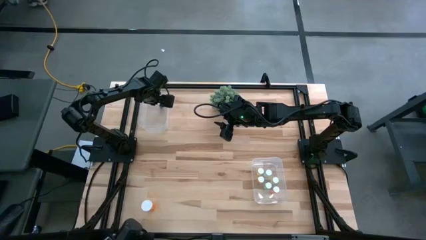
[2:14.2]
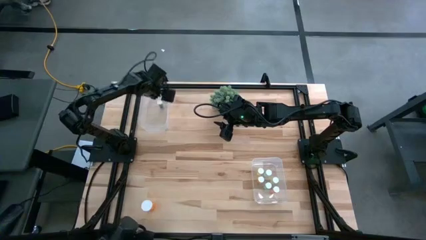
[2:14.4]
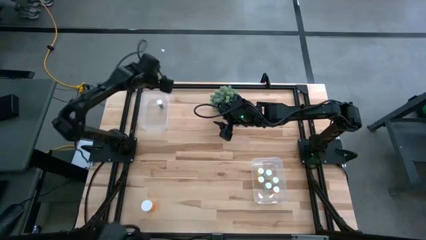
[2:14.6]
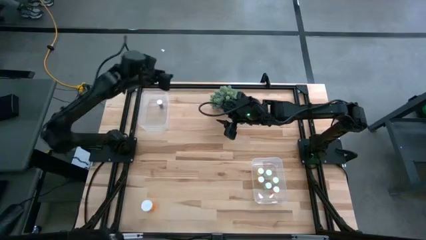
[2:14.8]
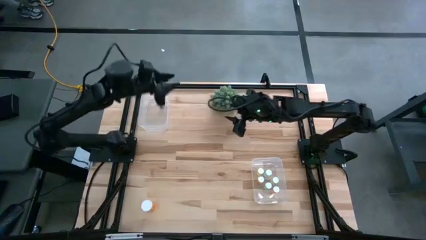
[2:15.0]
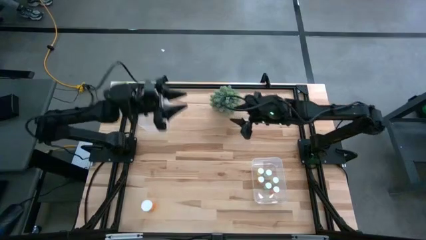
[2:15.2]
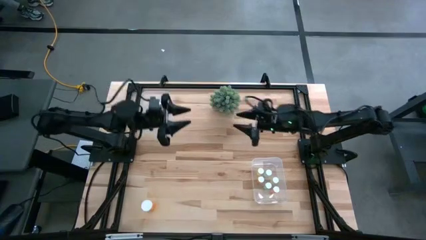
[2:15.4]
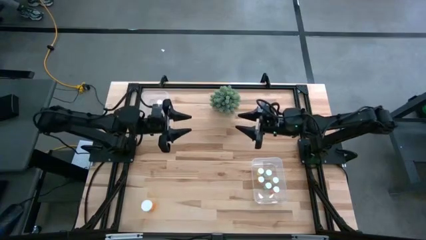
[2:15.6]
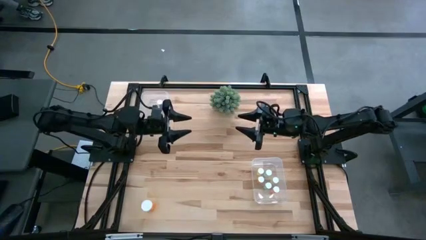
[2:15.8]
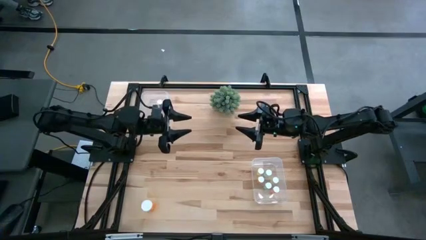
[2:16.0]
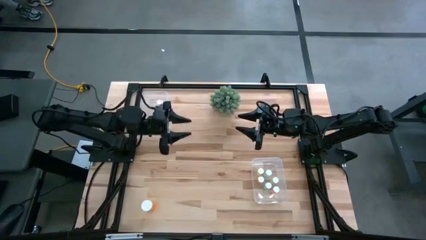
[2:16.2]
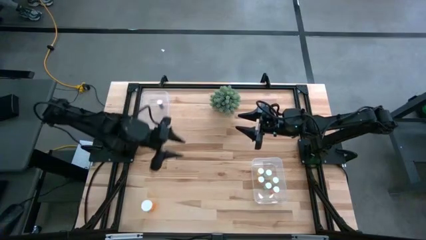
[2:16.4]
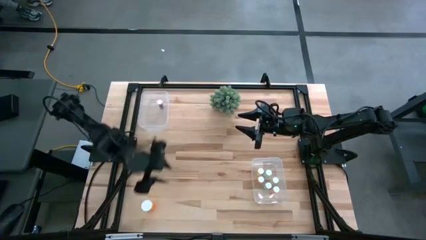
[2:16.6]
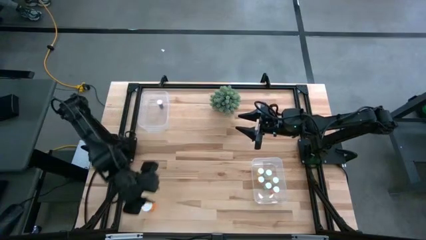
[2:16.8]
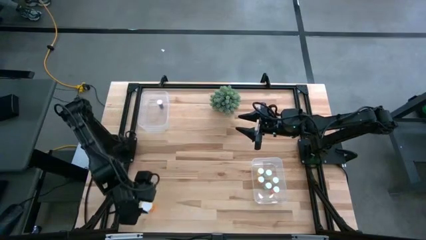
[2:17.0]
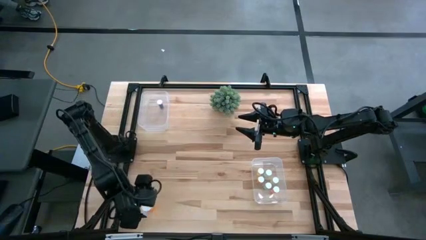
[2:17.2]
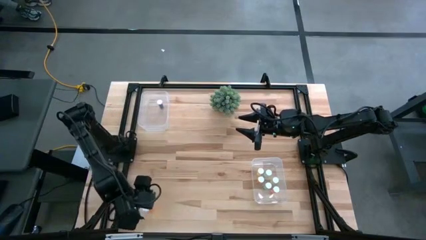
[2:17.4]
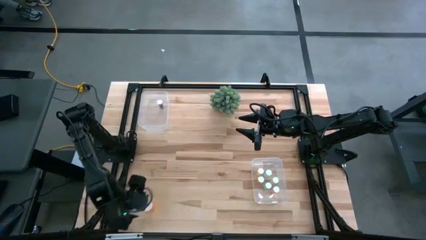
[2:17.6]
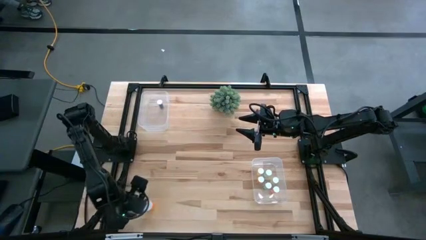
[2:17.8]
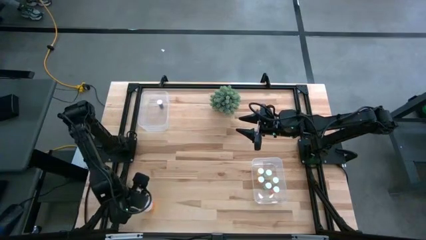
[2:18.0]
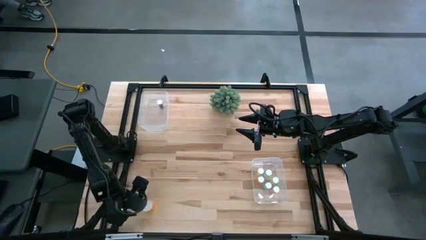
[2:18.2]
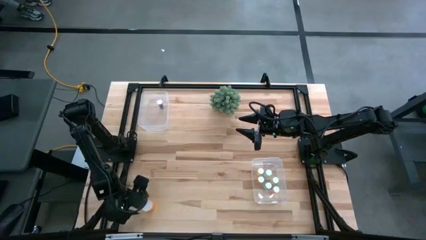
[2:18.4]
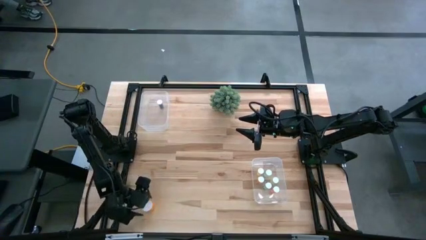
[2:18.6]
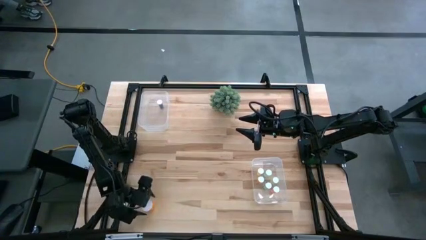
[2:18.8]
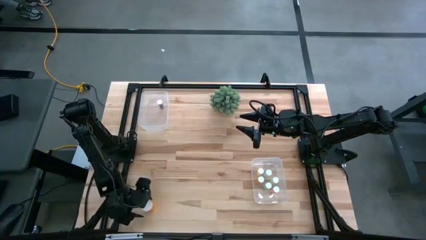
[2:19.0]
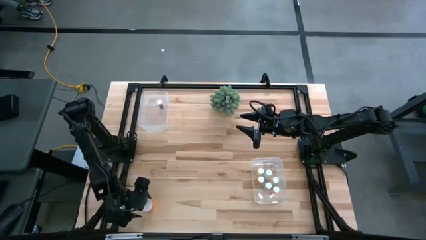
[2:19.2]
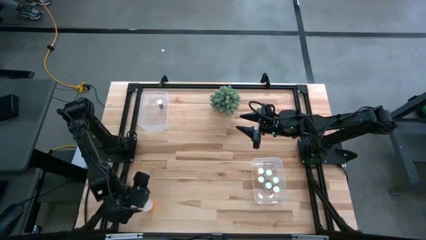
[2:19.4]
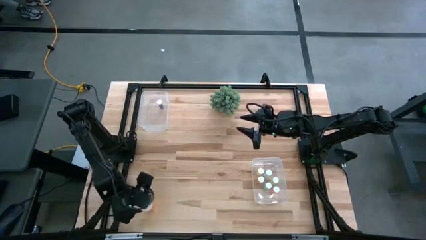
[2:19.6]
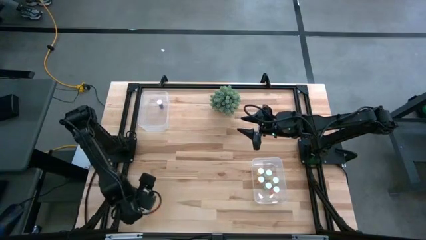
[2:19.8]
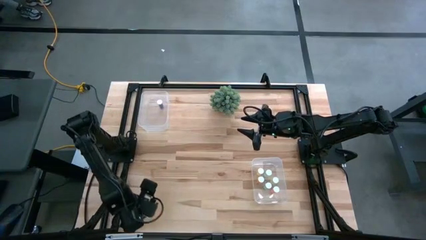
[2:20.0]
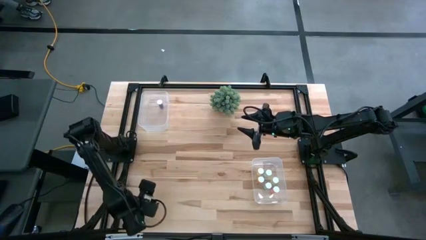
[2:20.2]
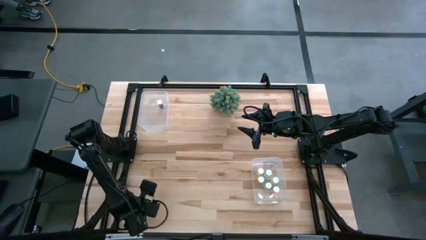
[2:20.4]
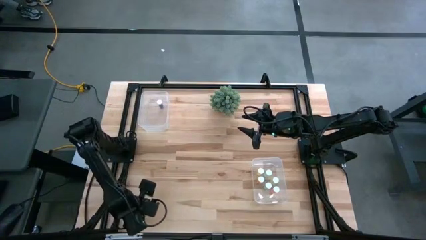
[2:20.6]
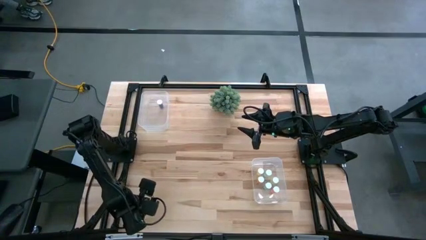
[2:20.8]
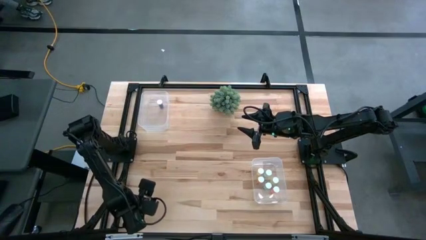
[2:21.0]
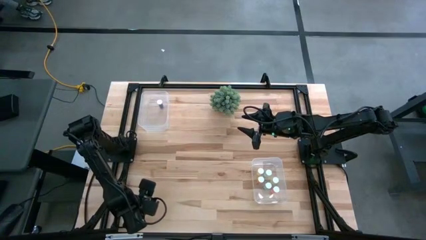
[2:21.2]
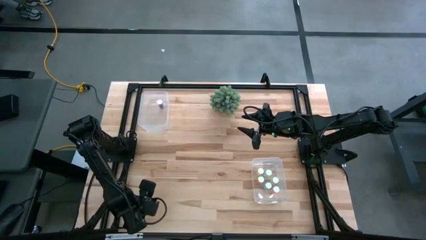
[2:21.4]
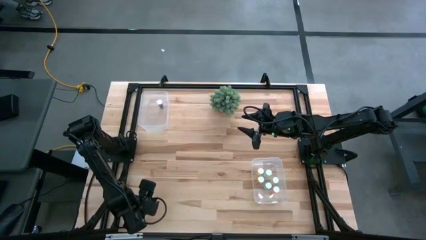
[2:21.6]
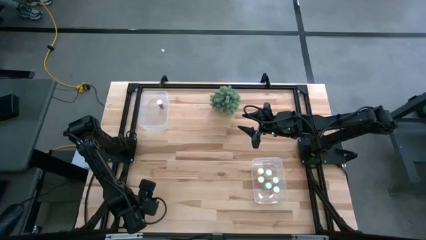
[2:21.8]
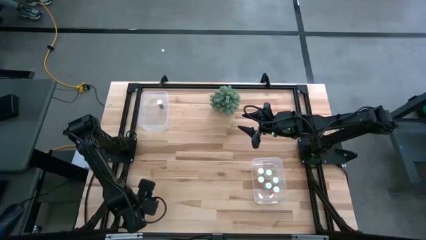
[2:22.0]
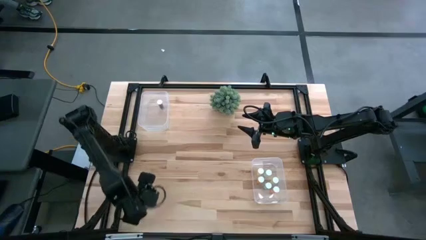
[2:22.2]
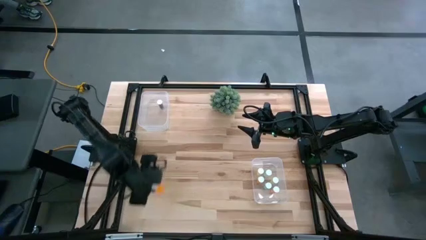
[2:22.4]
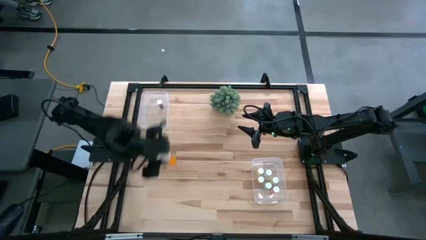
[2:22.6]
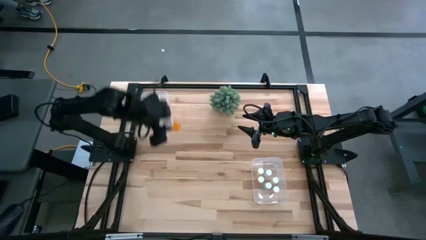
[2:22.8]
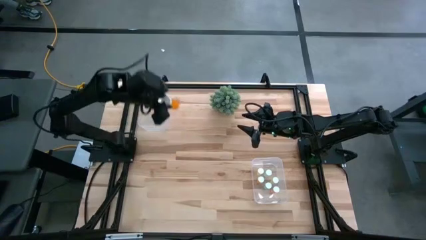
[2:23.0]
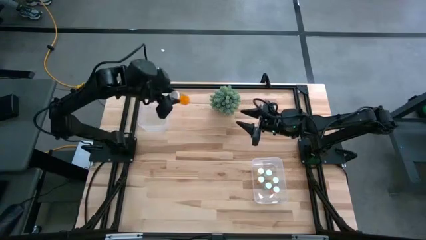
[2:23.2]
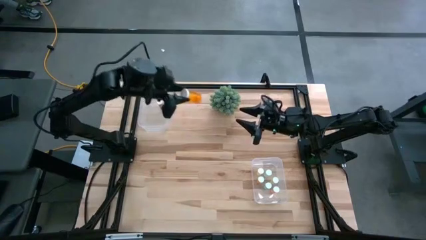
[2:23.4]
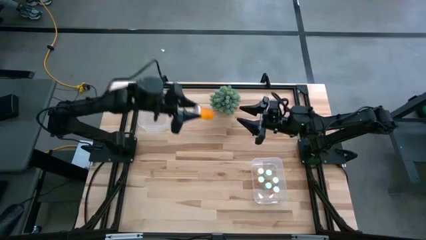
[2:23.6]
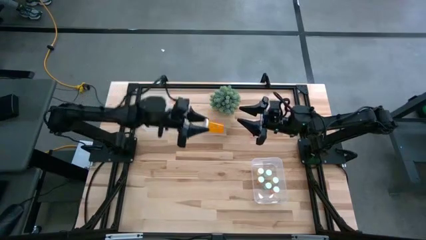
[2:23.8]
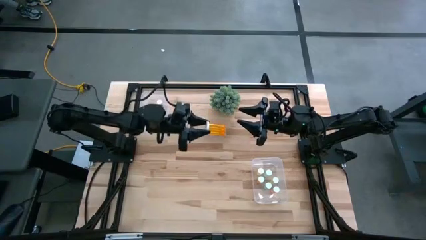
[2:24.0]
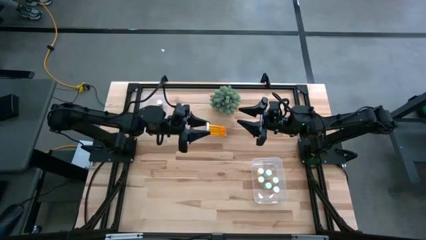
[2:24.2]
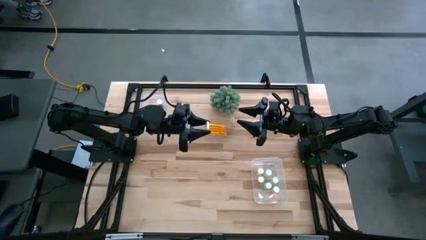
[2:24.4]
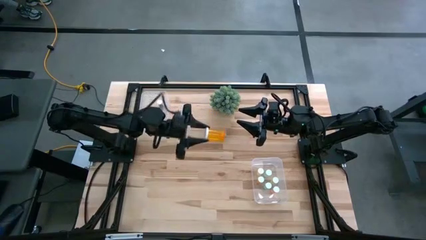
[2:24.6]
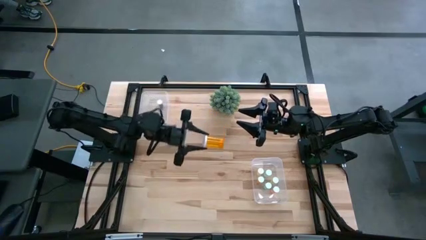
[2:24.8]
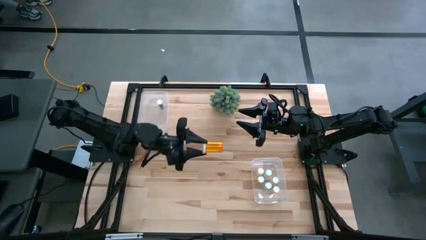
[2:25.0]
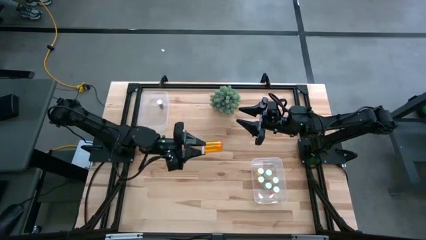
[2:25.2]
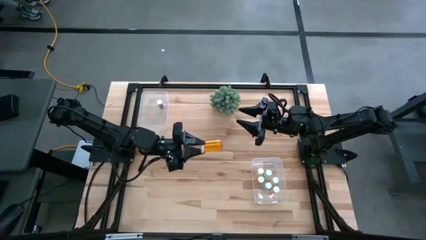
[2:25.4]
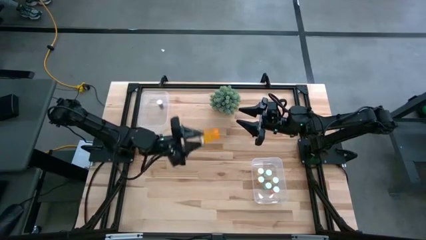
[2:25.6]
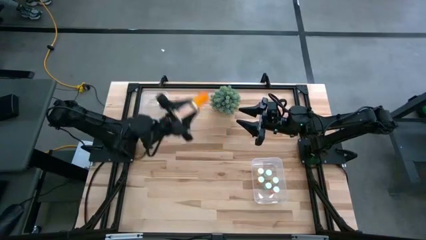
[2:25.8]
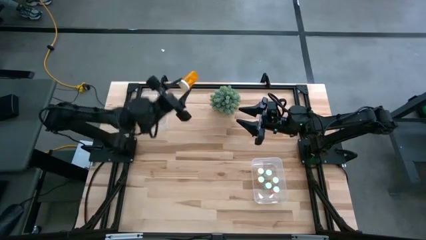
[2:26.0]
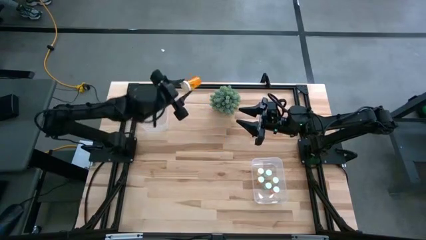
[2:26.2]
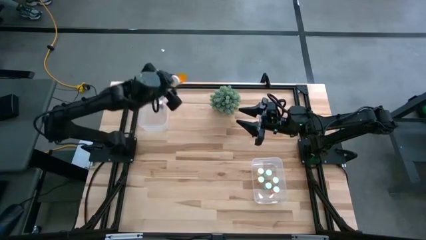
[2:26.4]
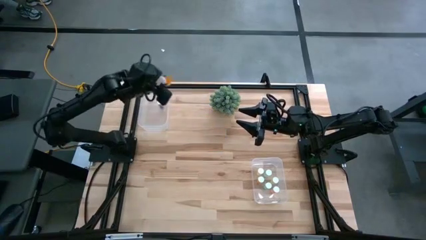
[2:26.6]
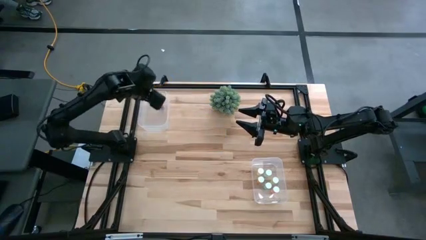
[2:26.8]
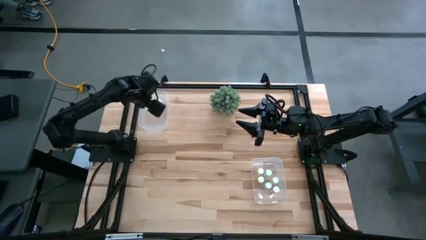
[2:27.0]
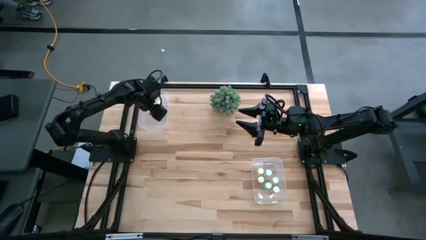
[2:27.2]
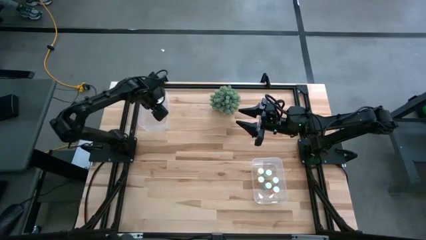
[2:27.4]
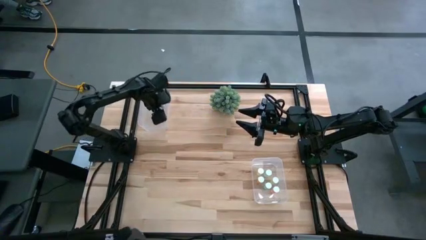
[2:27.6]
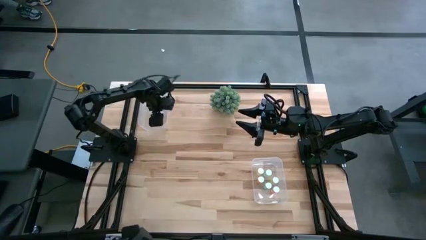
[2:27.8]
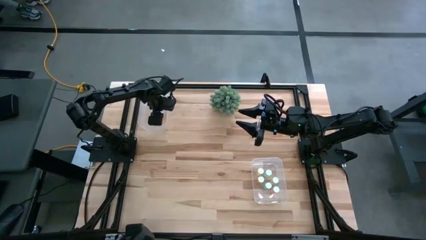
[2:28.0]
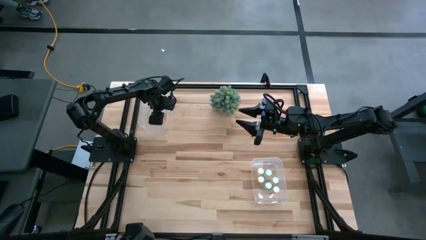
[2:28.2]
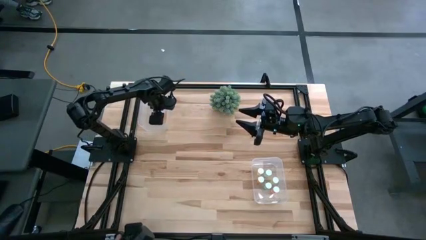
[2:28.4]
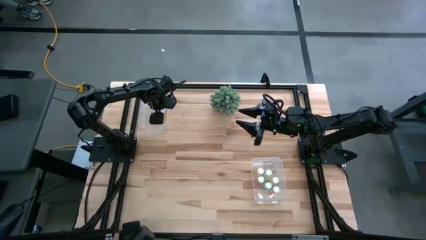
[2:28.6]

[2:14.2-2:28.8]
Task: Pick and place medicine bottles into bin by pill shape (circle, oval)
Put the orange capsule bottle into the left transparent bin

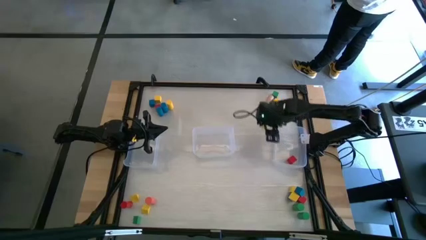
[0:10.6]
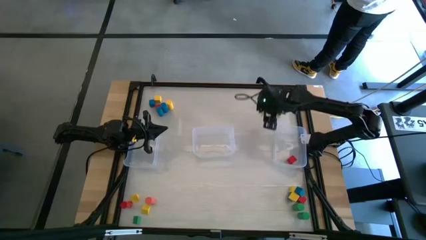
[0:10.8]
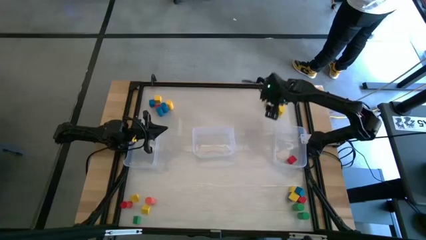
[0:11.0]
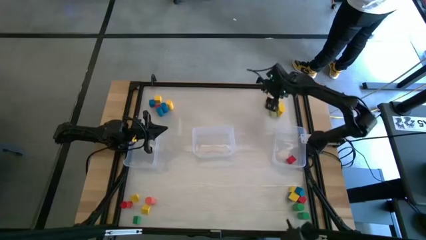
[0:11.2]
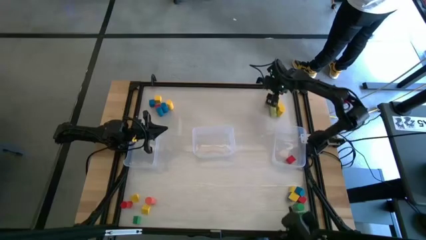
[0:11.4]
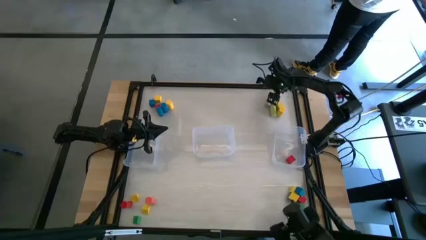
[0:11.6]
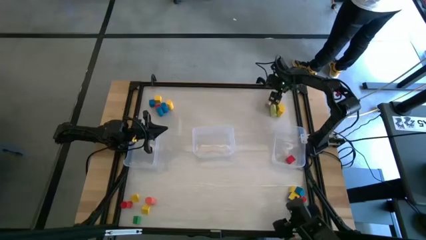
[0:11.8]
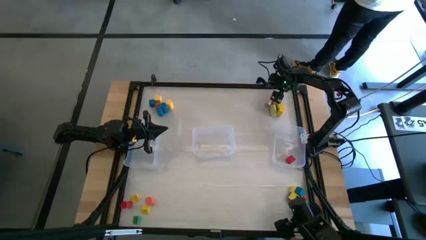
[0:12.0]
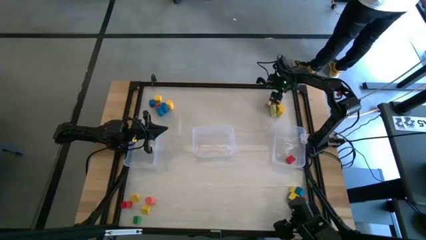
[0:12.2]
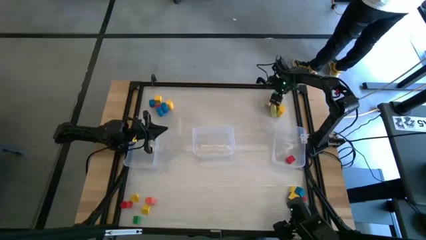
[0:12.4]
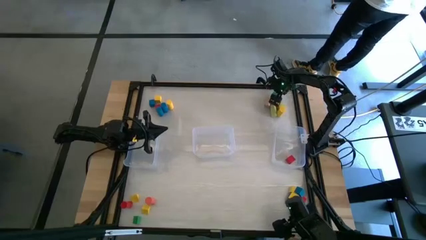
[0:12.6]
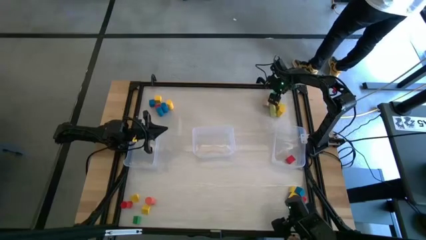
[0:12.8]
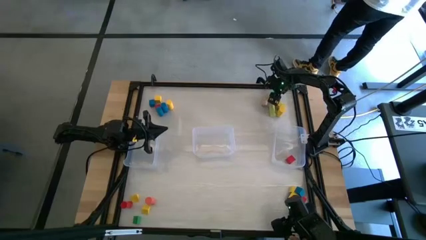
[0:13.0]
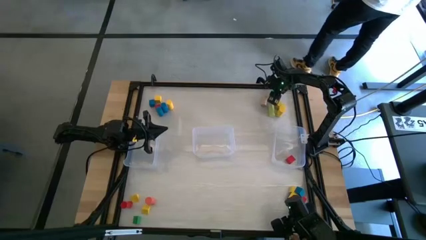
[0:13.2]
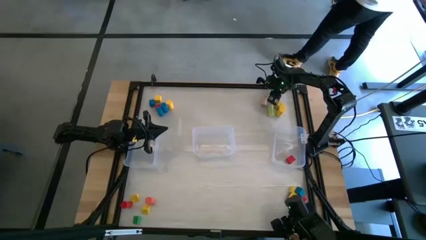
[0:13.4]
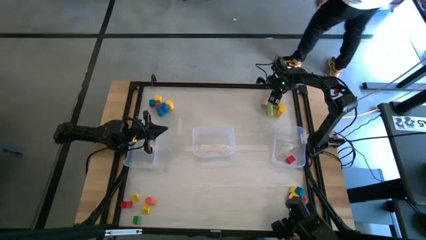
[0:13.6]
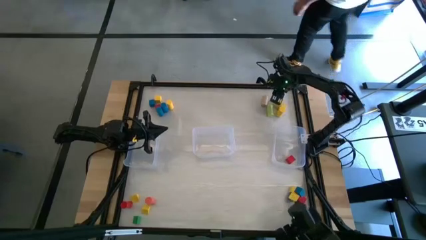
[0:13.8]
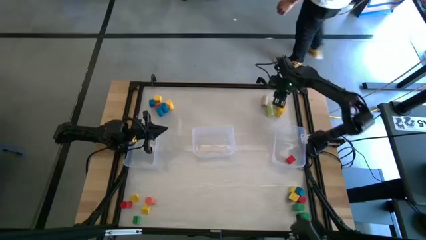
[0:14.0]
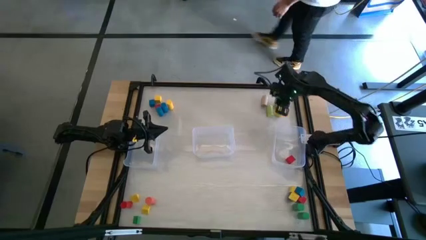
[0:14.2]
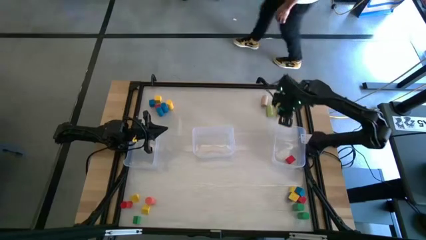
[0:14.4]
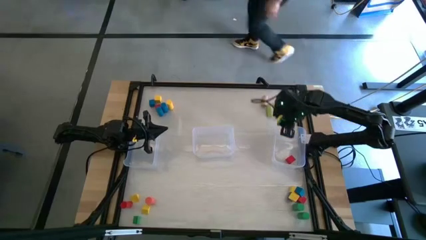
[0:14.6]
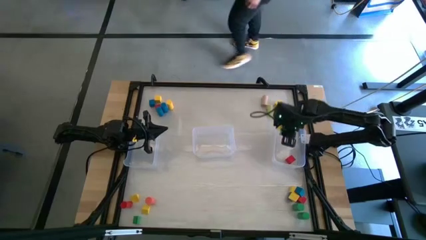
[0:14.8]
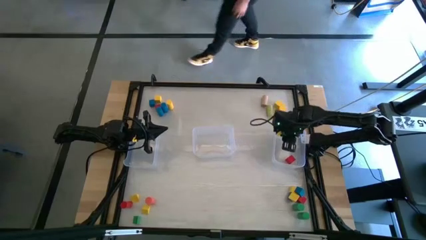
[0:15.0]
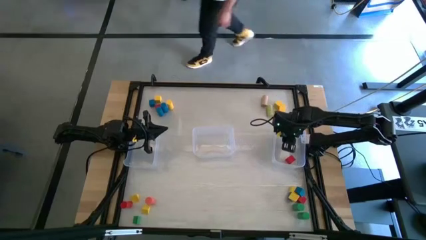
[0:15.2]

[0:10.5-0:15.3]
Task: Sort blocks by size
Put the green cube block into the right transparent bin
